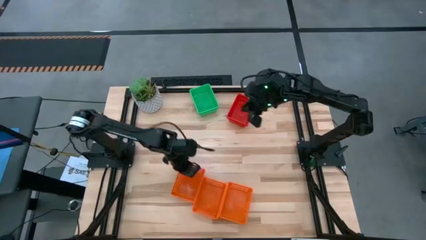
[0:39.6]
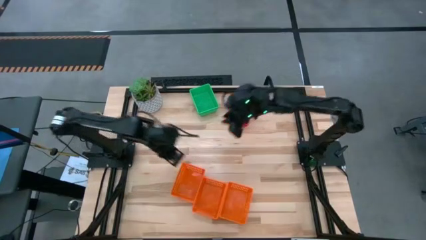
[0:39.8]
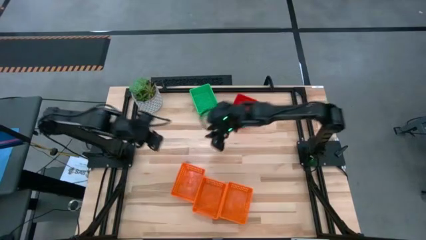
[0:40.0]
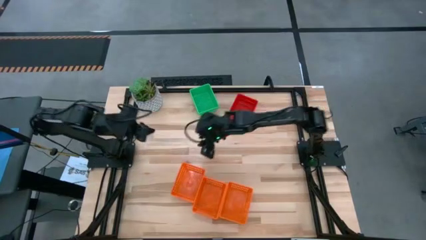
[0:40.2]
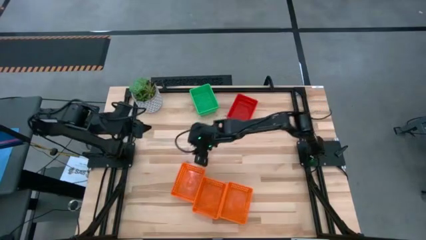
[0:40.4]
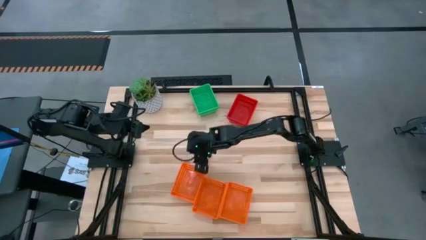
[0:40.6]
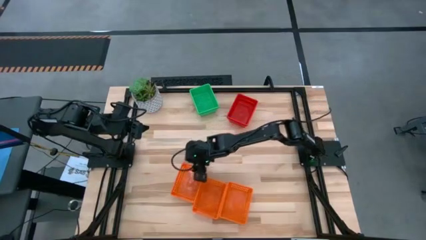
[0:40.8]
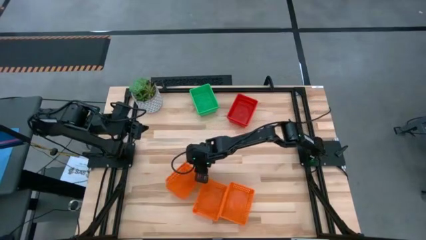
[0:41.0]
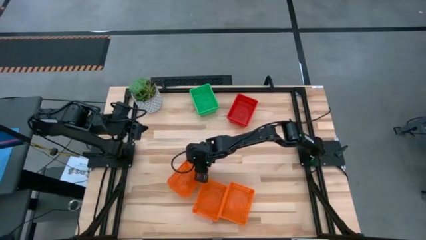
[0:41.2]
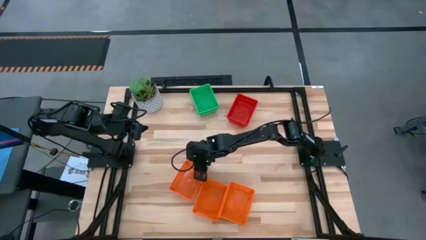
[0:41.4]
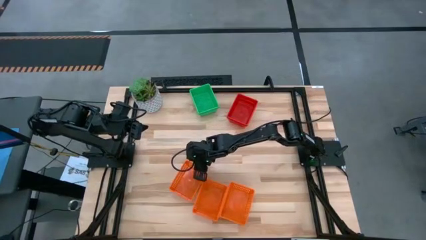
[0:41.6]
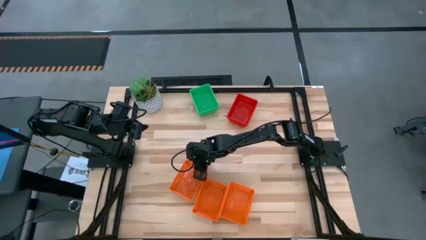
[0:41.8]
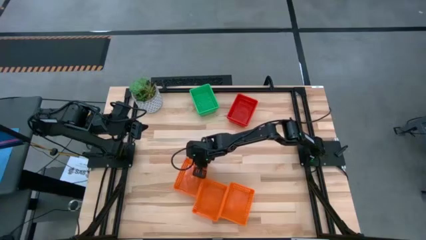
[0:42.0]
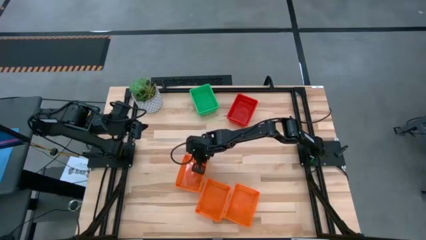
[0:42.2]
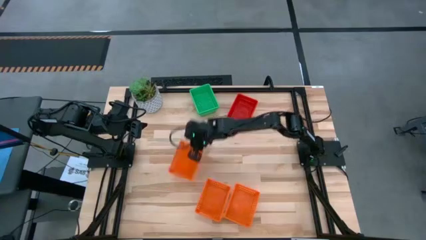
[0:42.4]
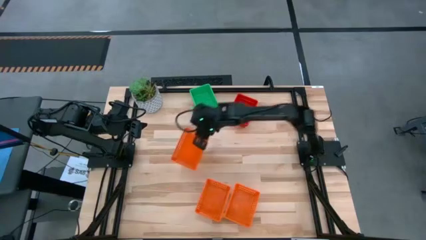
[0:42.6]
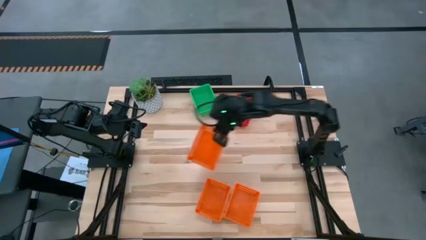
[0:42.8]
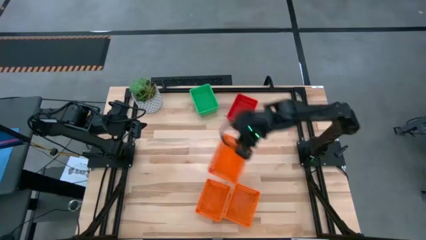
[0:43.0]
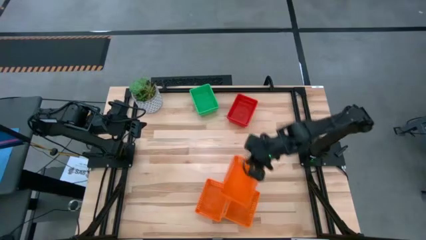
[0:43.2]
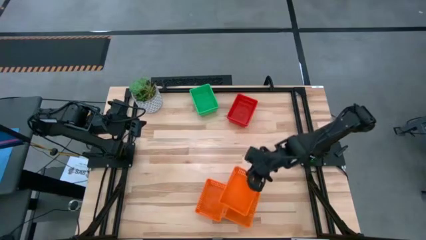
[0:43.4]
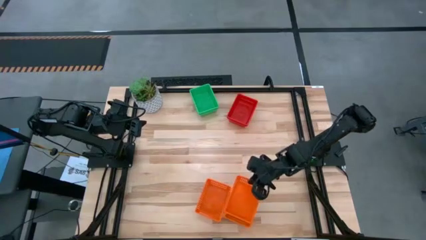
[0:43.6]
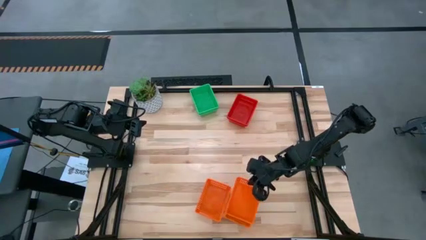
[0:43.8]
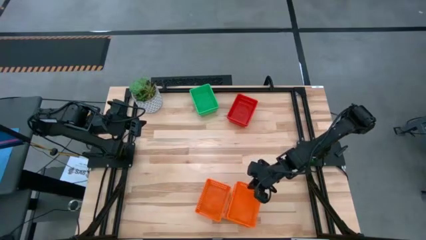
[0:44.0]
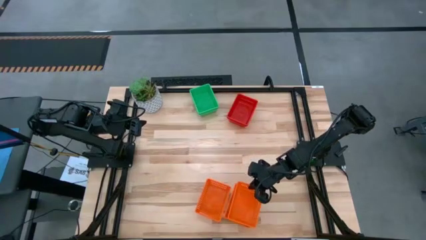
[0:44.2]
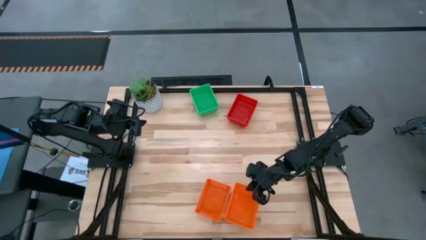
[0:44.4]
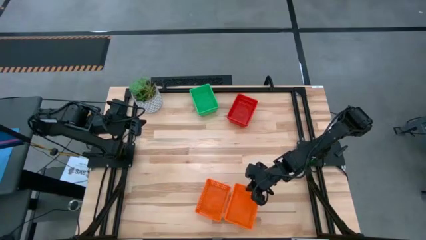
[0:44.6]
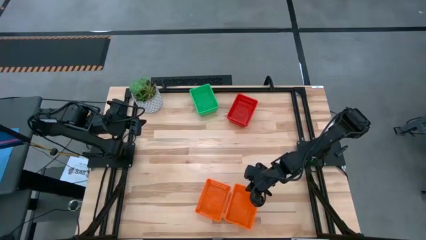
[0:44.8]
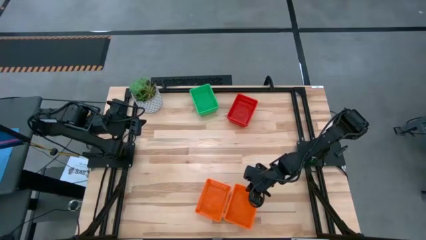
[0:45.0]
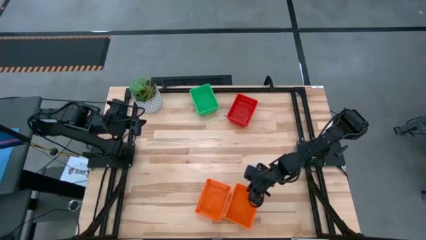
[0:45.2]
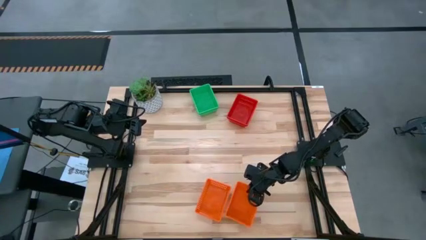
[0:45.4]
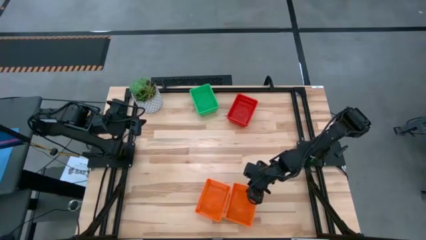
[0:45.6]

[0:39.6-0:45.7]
Stack the left orange bin on the right orange bin

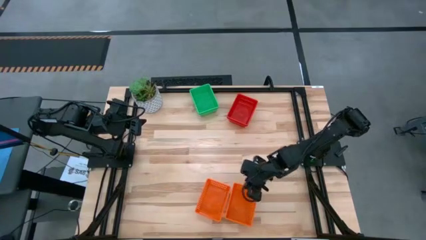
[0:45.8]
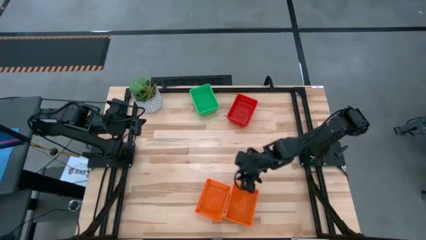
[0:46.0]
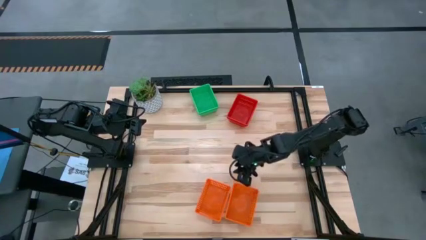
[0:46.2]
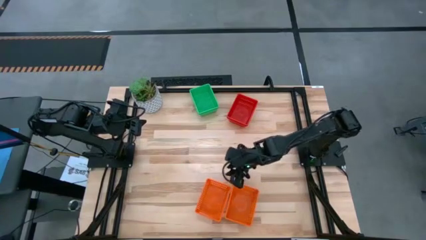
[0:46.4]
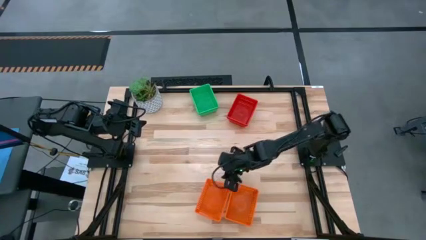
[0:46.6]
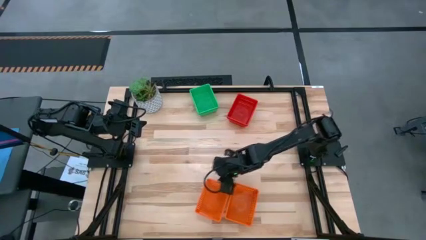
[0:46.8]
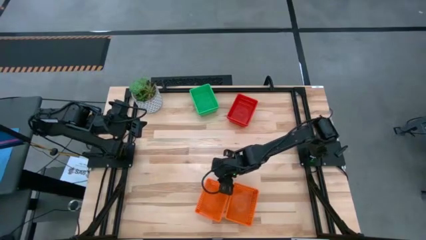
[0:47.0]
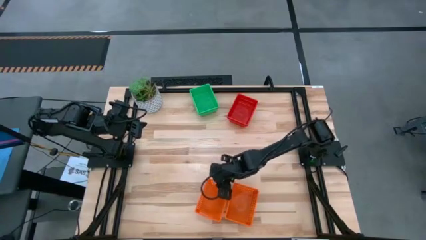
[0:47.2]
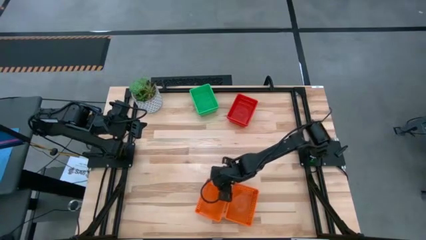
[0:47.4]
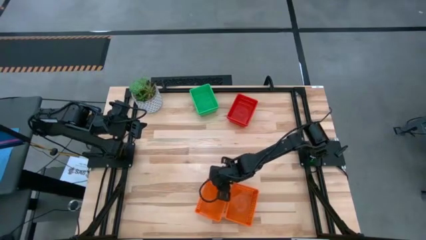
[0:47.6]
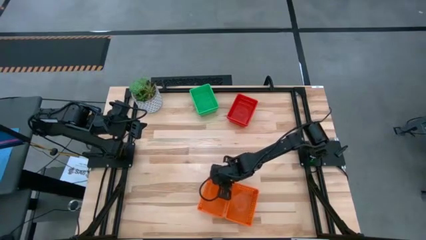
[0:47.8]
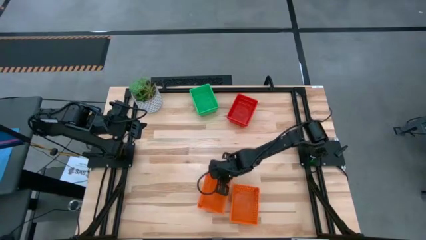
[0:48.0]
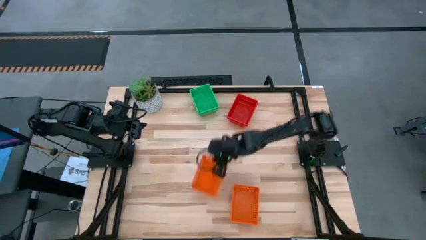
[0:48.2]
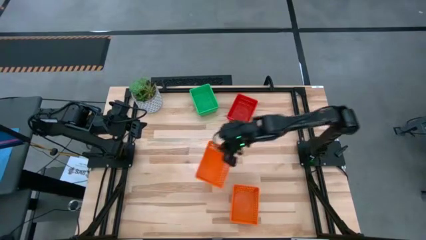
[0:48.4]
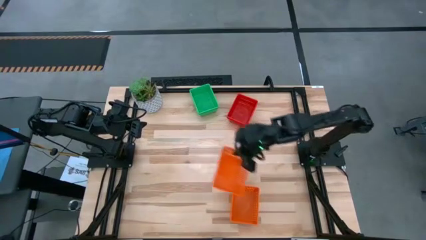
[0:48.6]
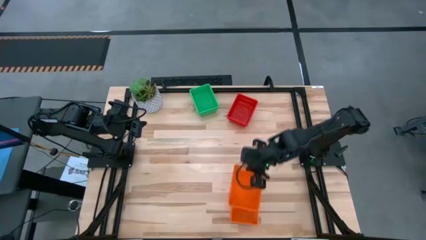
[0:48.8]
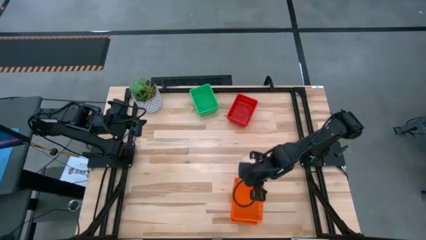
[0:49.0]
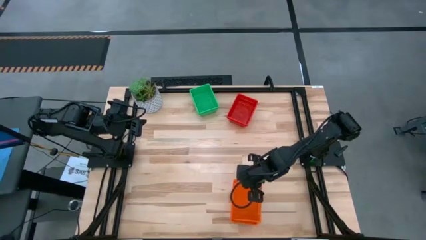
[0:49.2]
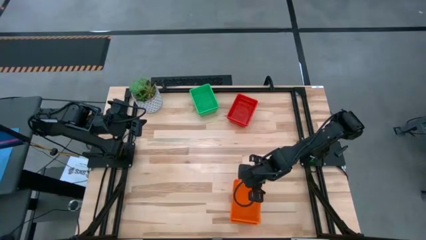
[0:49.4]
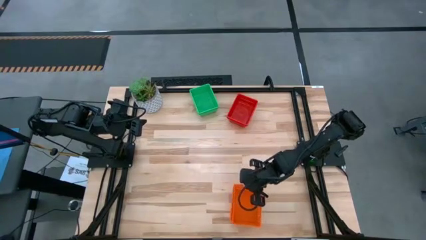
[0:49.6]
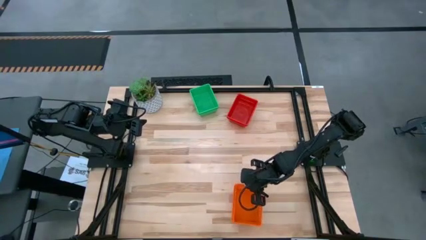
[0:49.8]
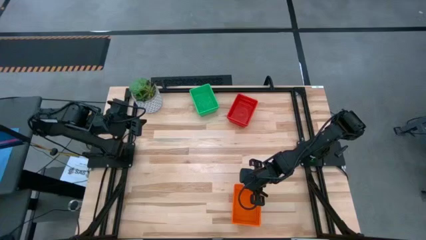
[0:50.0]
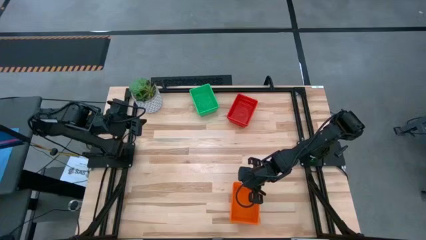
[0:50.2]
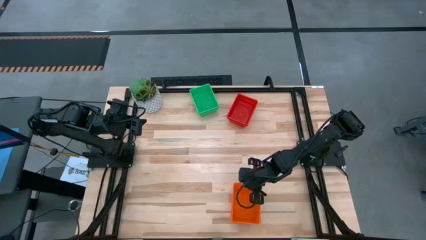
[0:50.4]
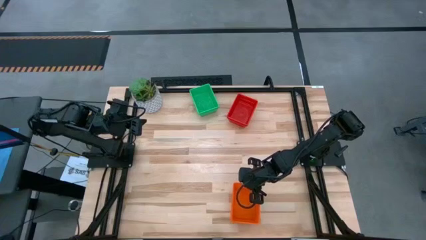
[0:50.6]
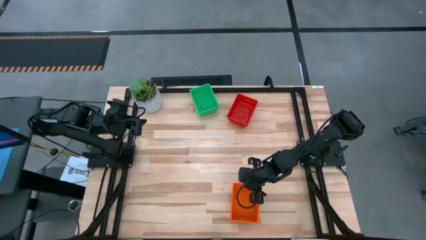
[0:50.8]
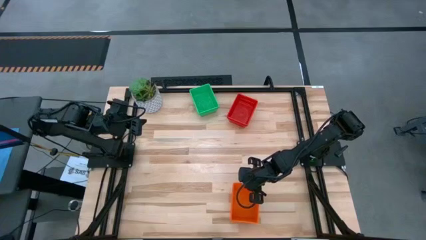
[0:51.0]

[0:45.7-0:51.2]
Stack the left orange bin on the orange bins

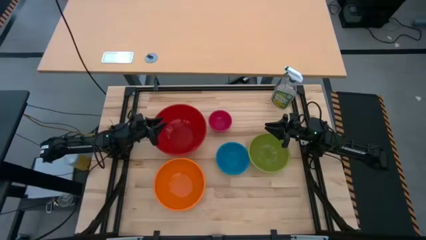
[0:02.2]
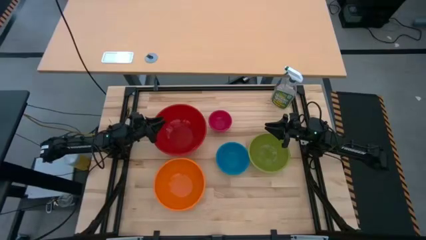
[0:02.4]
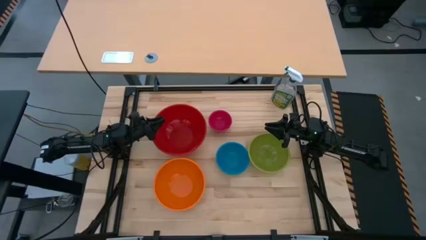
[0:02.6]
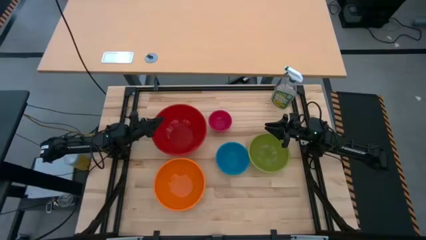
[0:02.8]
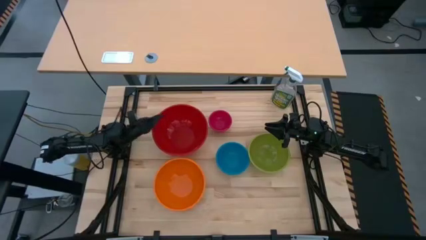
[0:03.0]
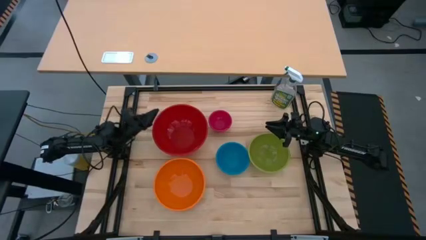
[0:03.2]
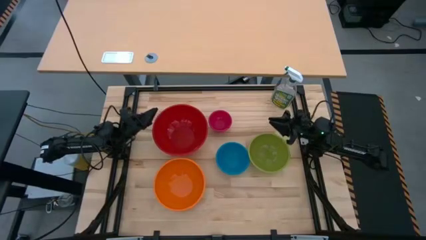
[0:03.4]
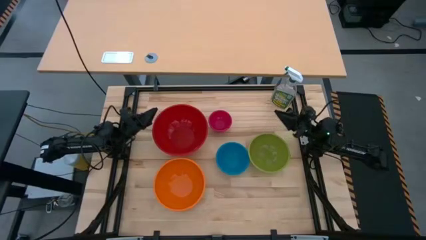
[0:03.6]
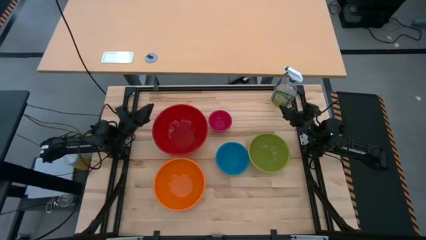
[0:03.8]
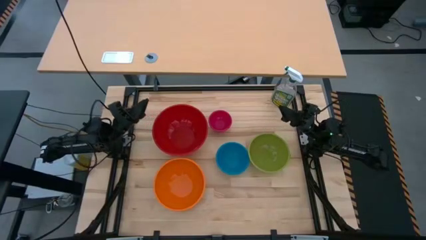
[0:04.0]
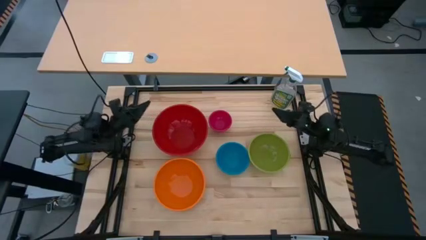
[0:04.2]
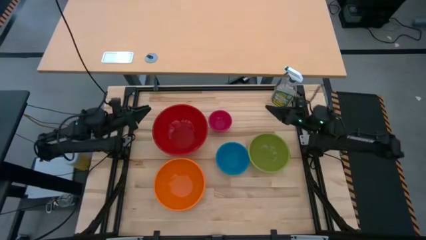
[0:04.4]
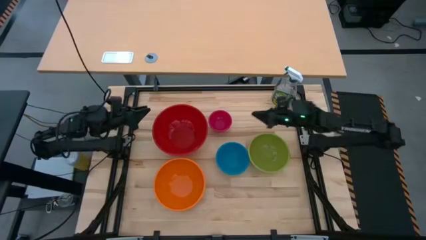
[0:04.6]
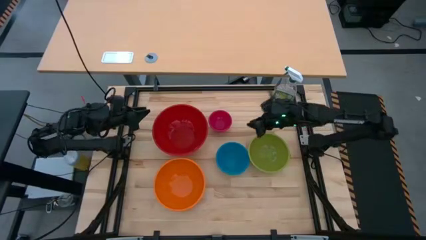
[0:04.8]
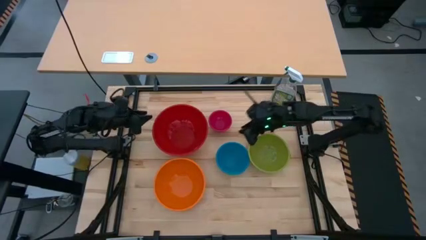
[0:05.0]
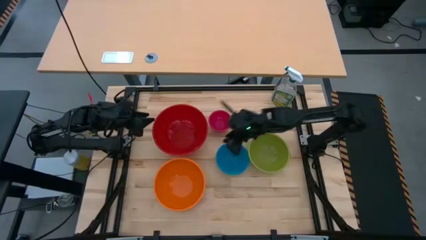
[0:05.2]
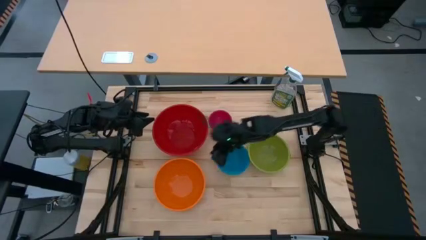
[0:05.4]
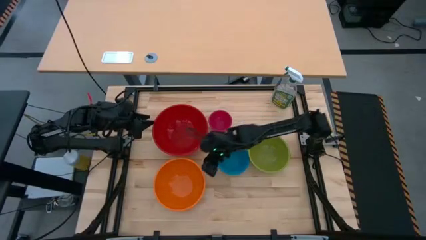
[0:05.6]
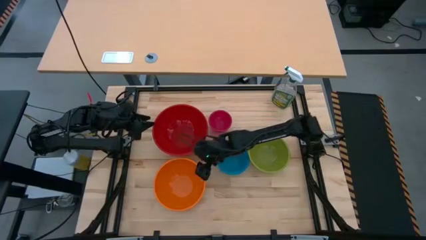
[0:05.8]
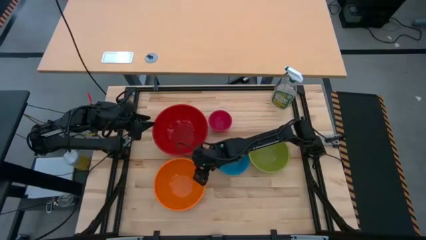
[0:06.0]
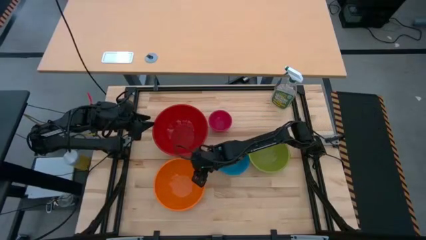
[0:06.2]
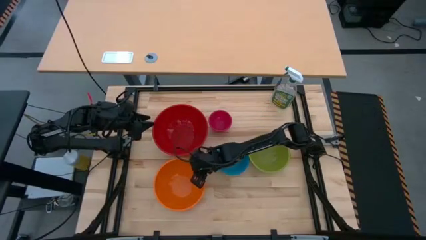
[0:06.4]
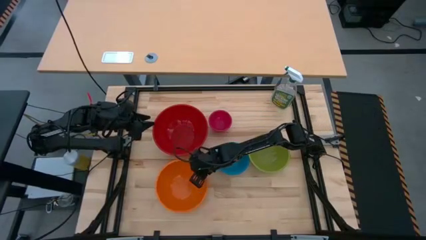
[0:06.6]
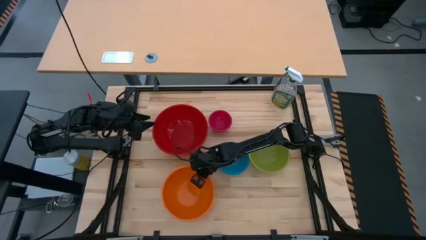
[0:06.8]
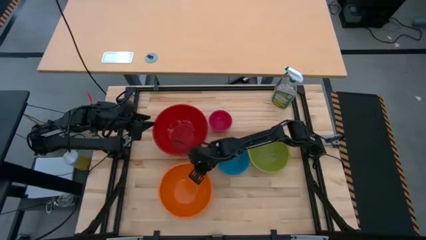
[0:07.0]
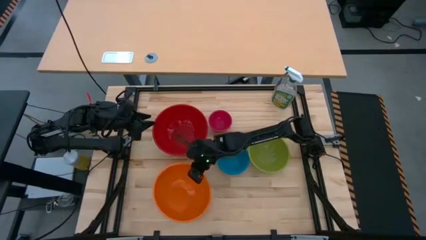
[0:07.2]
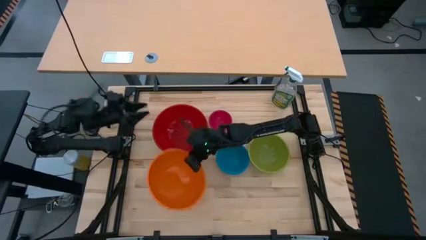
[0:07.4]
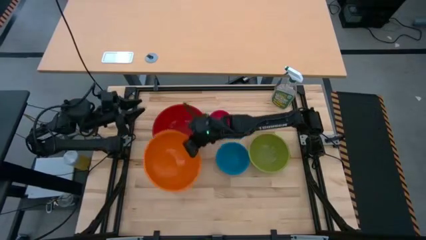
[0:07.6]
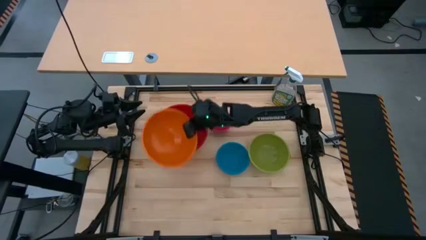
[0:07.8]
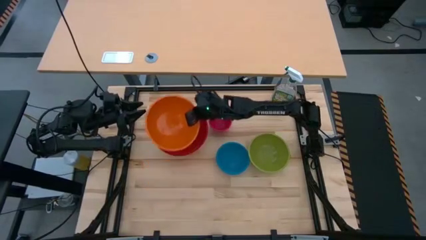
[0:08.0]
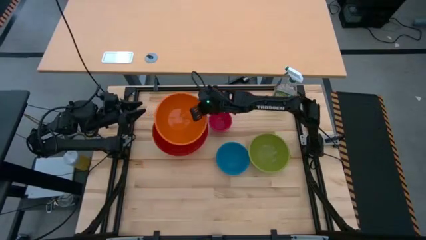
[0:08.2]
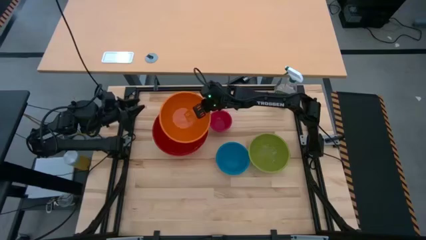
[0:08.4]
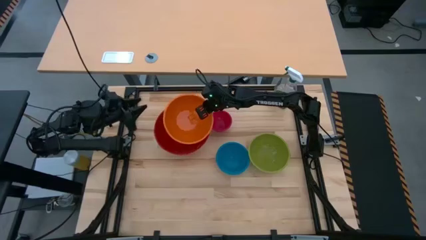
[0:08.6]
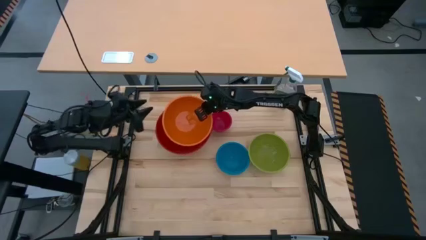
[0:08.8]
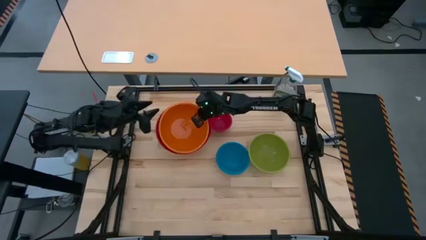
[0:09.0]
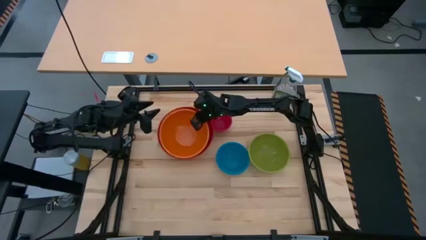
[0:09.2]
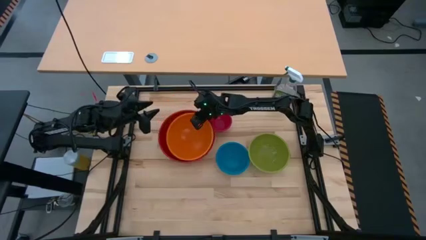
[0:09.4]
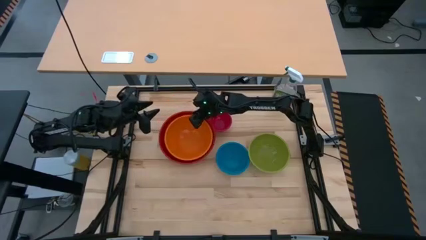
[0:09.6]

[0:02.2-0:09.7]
Stack the orange bowl on top of the red bowl
